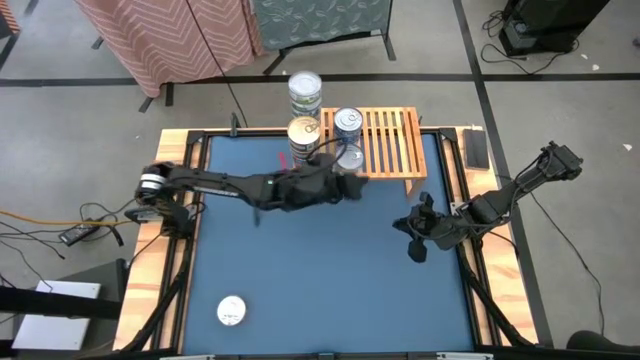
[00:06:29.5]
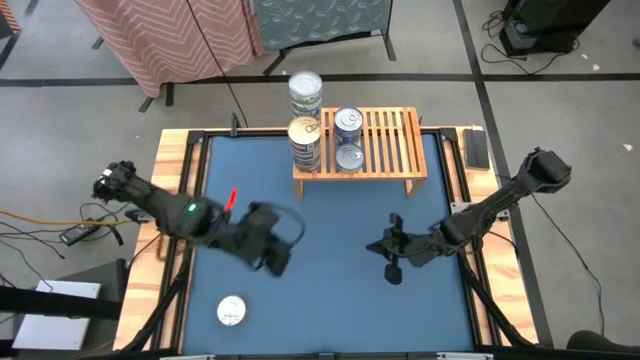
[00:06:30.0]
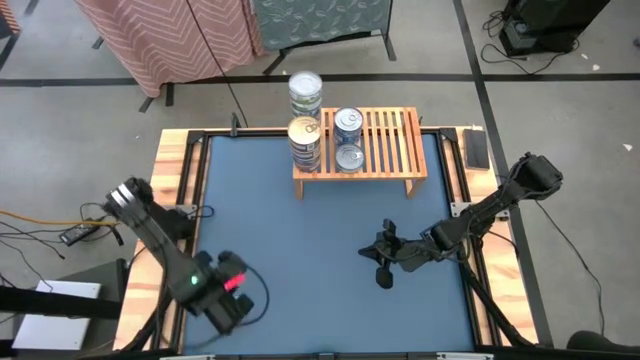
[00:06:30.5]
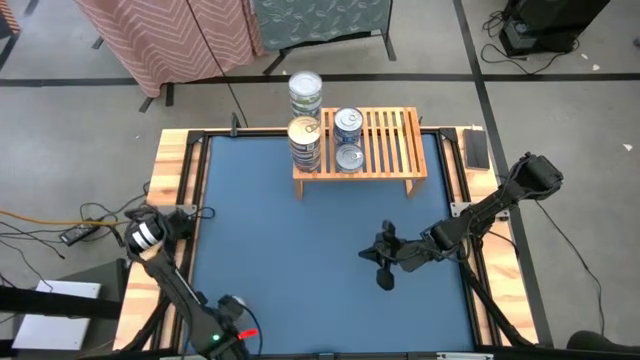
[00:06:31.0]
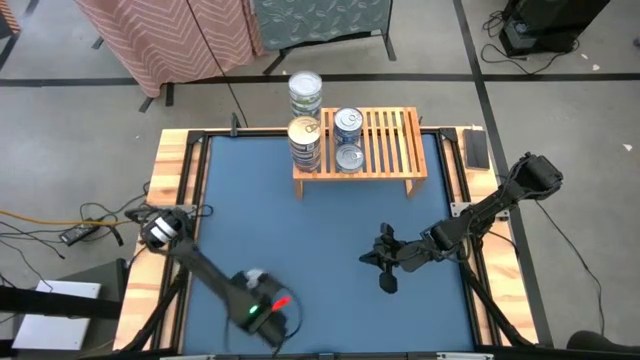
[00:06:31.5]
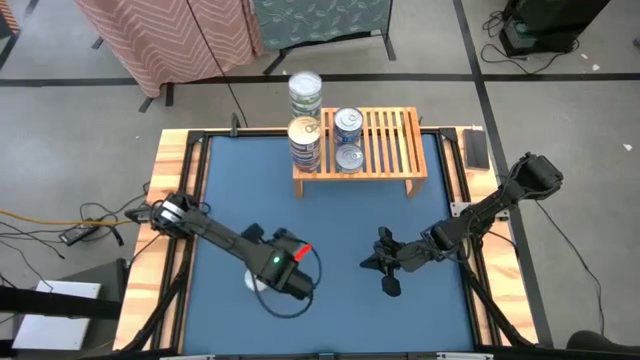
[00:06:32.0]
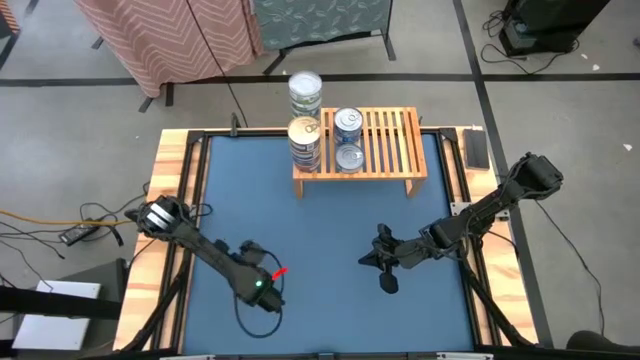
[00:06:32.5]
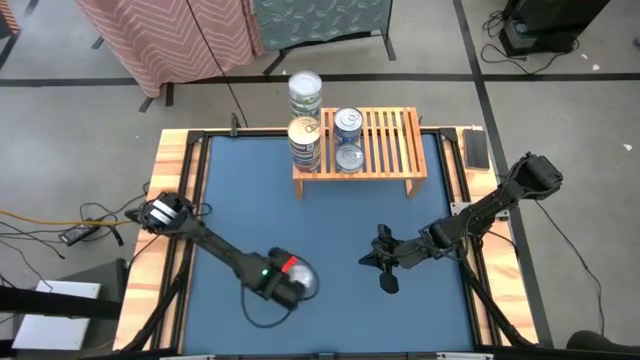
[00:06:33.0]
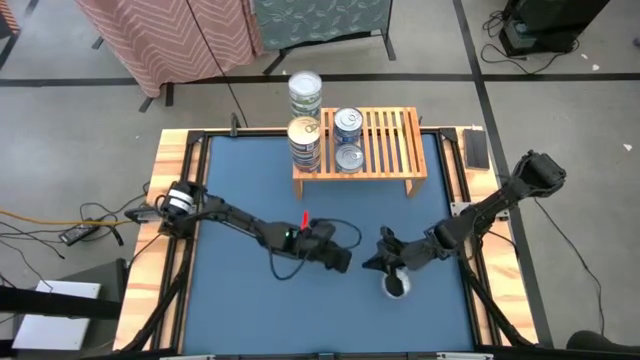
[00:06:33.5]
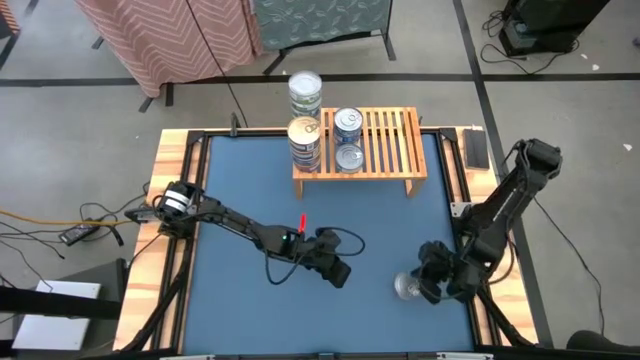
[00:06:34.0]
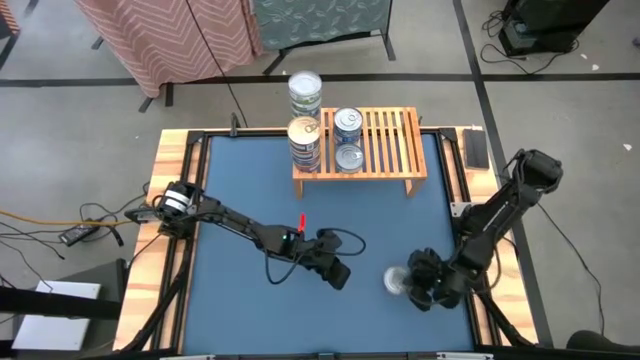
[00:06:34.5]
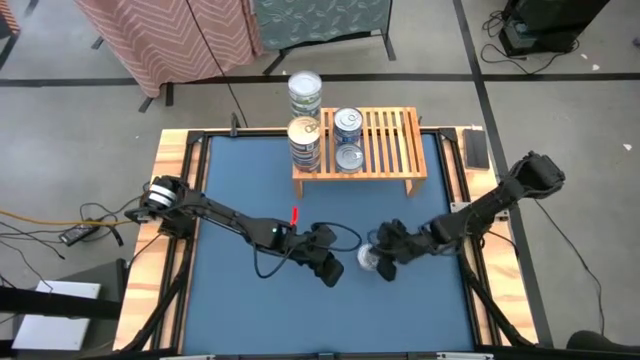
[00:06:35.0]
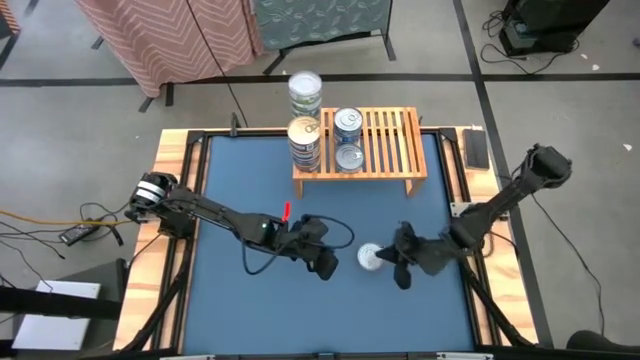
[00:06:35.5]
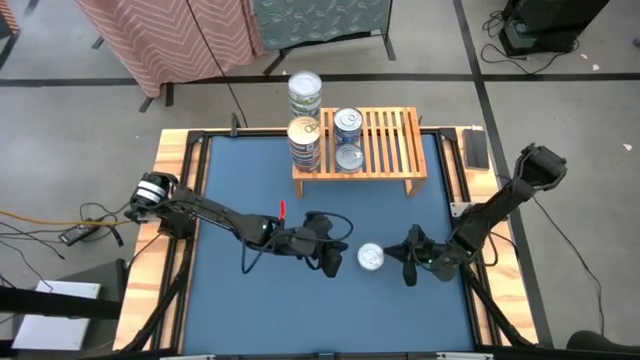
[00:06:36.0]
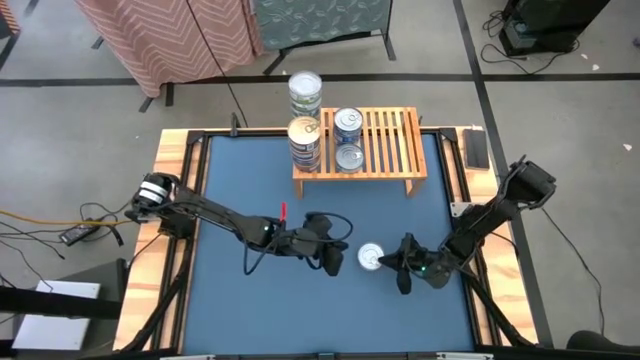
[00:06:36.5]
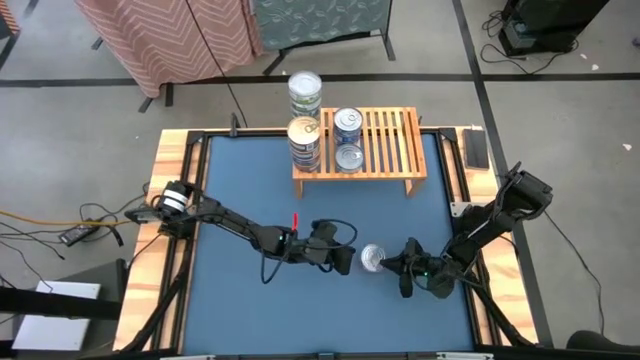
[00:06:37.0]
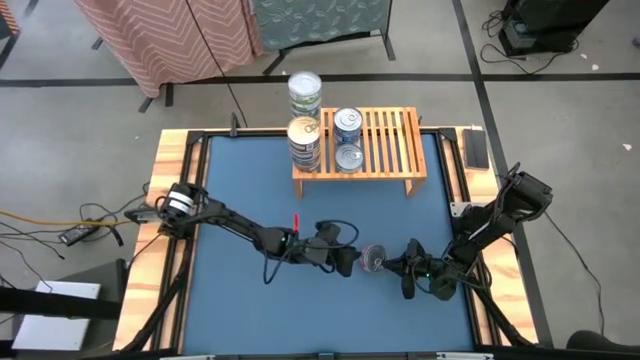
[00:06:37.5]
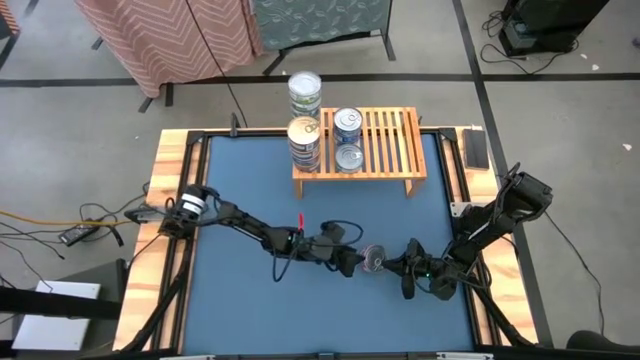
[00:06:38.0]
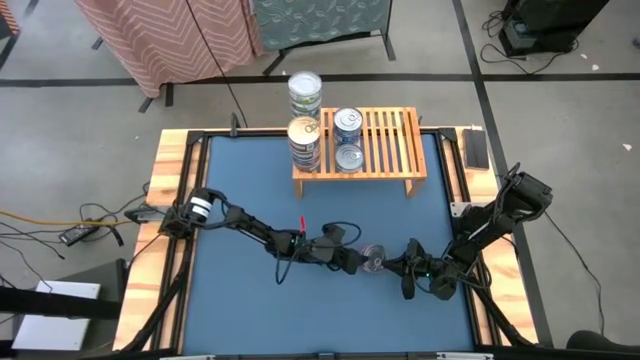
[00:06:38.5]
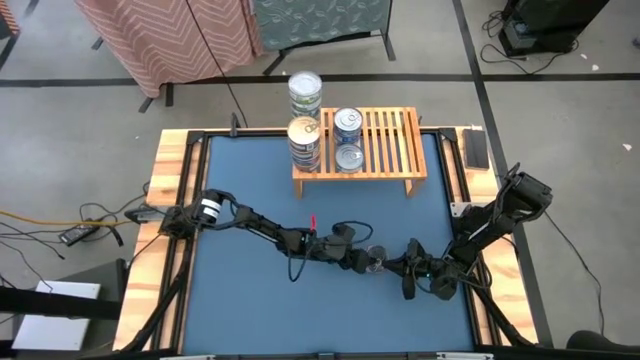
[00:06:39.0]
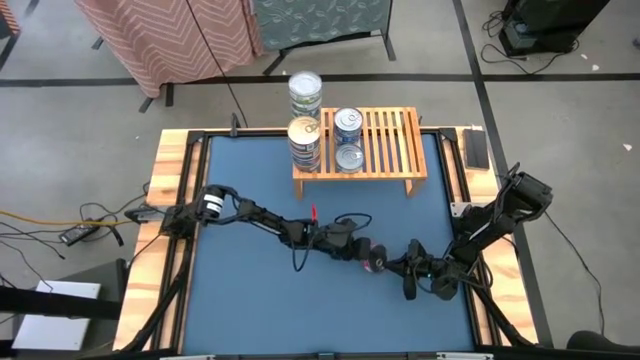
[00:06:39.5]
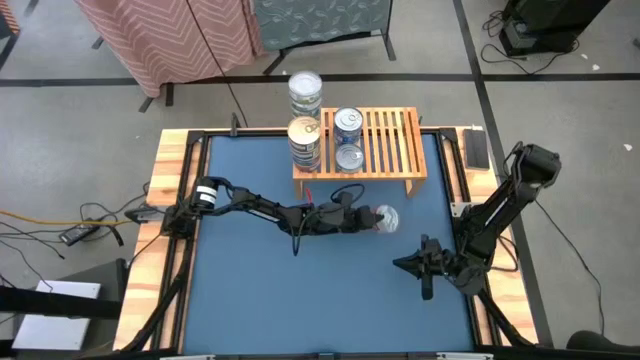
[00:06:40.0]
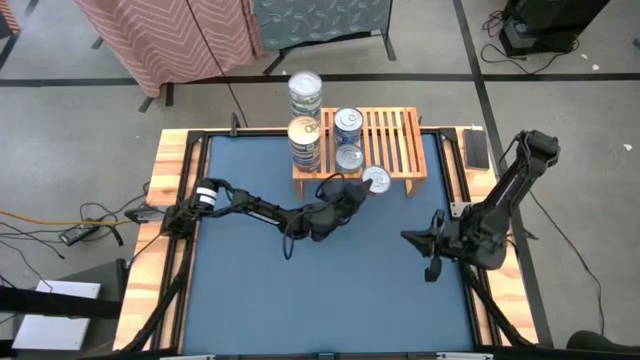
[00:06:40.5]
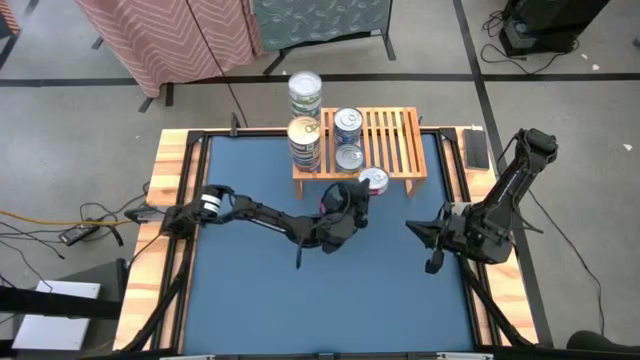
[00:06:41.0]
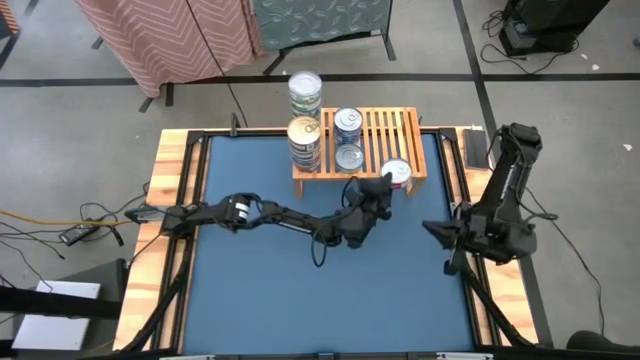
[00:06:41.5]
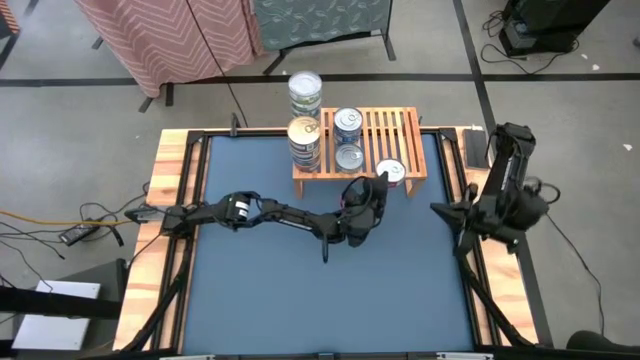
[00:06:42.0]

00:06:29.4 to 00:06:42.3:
Task: Stack canned seafood by type on shelf
Put the red tuna can on the shelf

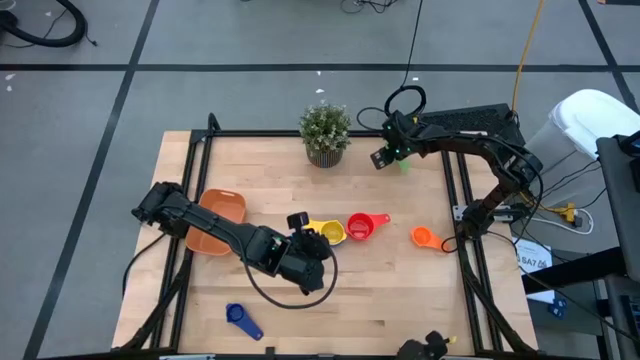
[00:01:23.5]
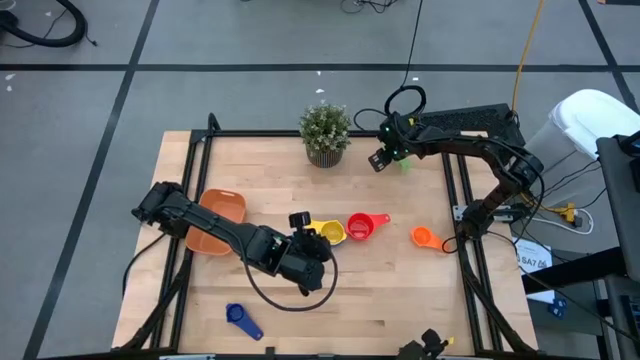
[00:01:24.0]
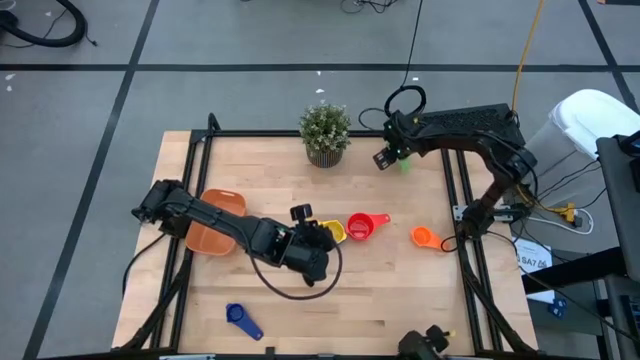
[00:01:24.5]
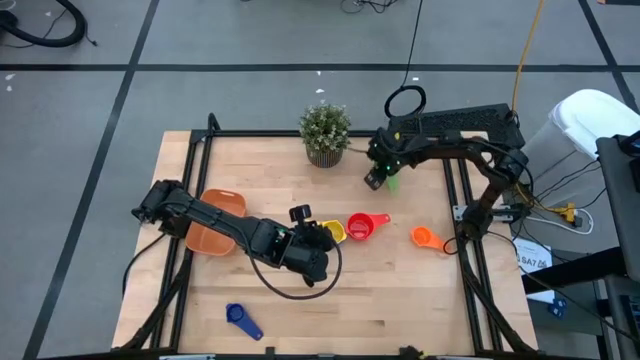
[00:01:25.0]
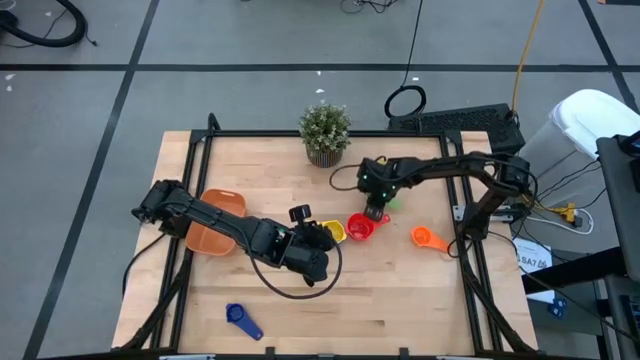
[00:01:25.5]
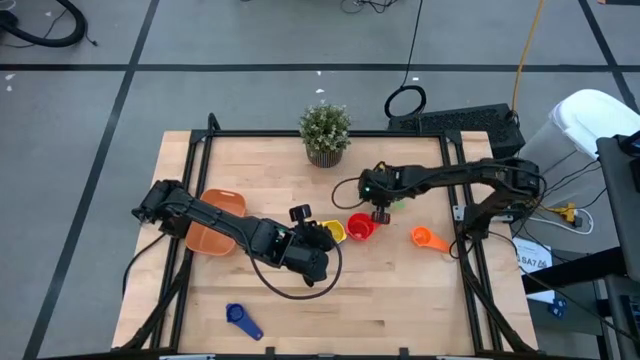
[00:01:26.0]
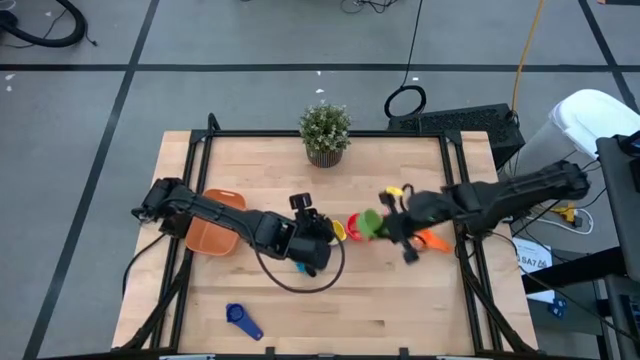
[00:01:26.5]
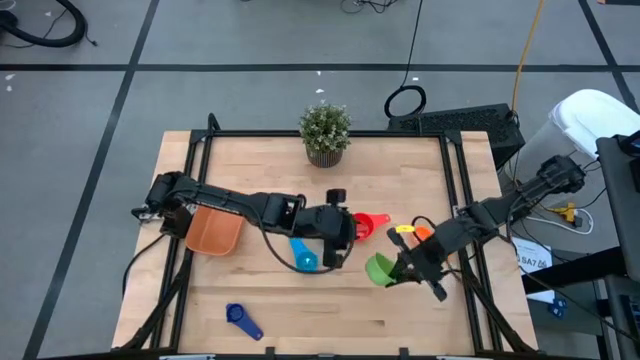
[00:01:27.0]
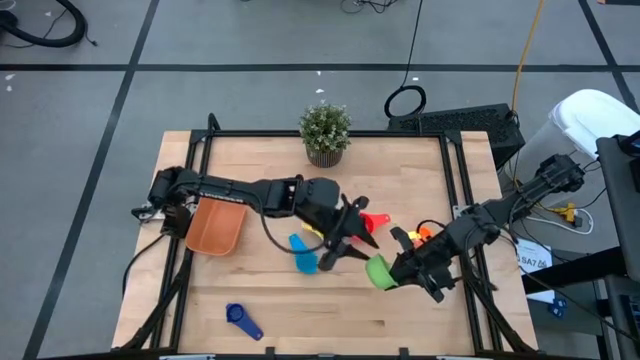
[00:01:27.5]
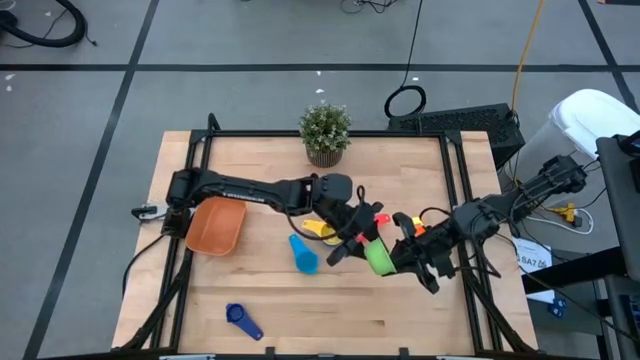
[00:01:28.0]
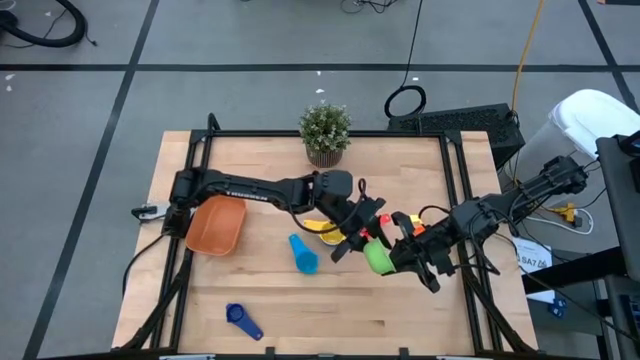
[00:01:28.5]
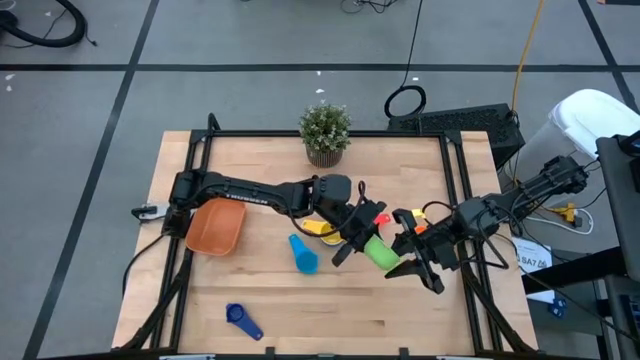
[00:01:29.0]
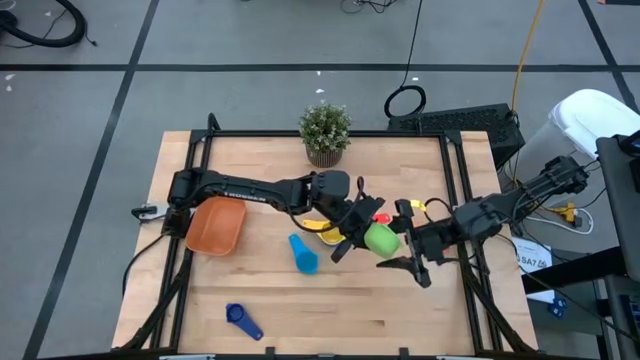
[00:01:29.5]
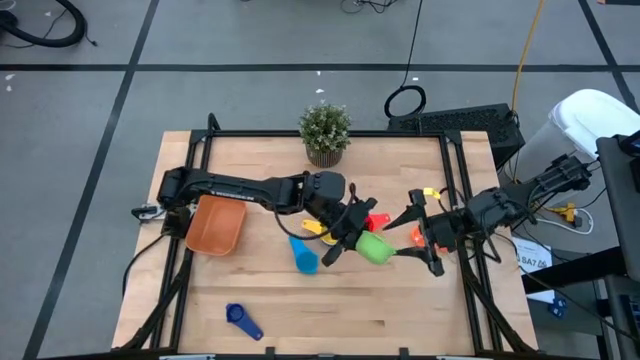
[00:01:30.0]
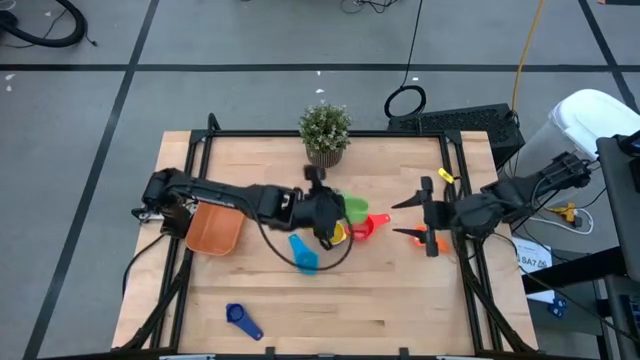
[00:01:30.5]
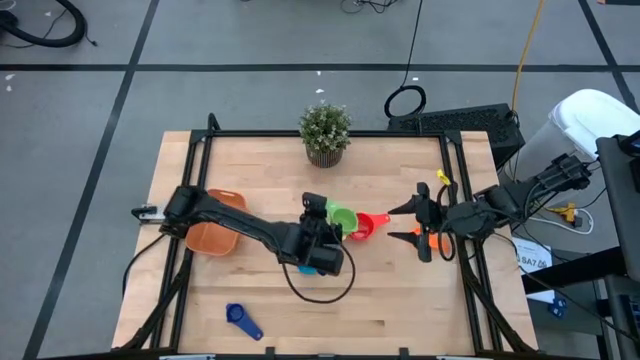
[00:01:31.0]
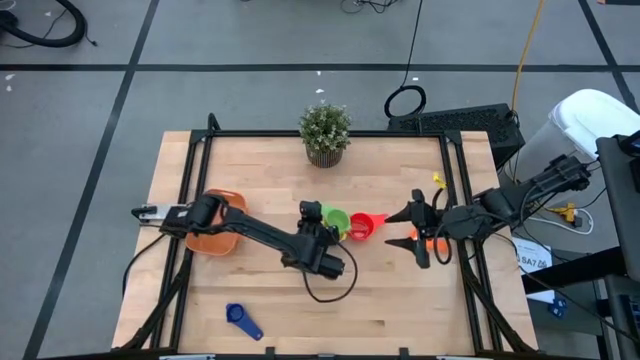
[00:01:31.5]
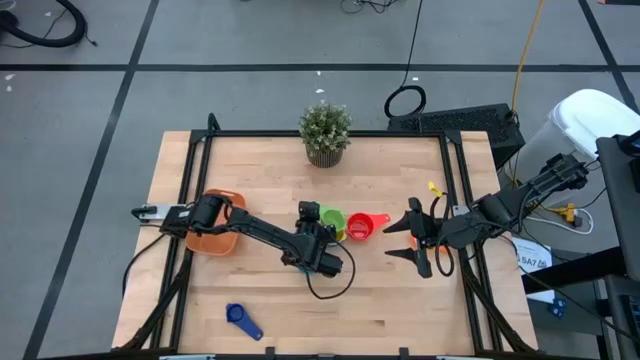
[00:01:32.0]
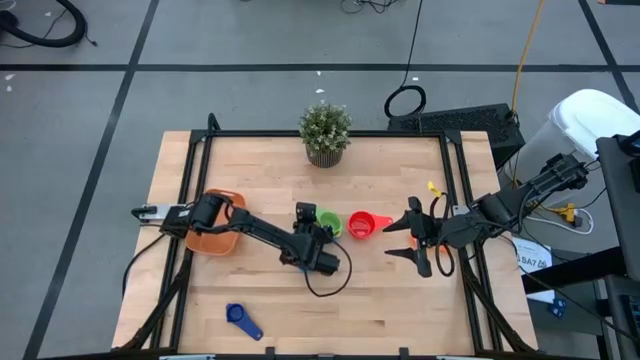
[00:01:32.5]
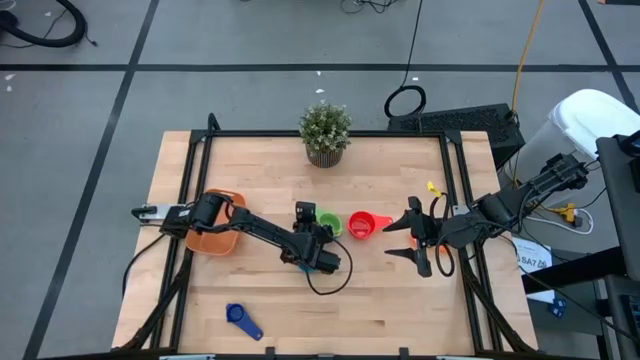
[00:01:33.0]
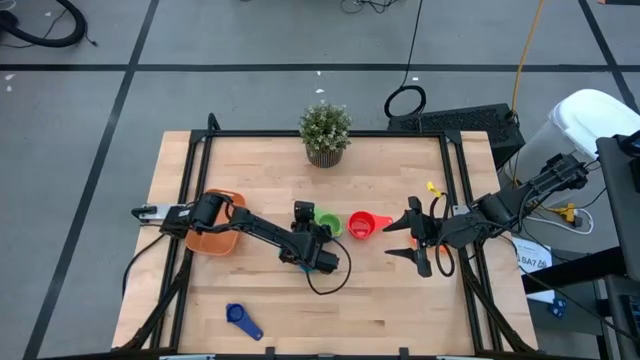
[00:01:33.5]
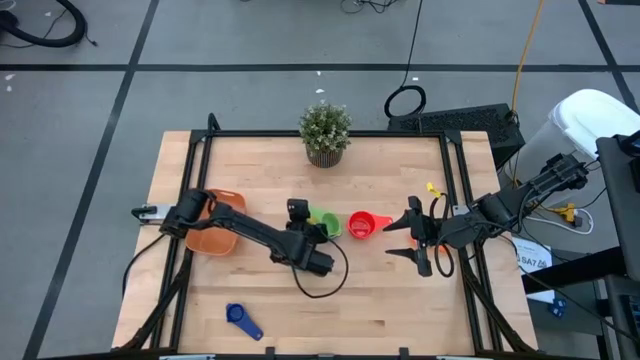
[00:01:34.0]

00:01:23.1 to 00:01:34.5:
Task: Nest measuring cups in basket
Stack the green measuring cup on top of the yellow measuring cup
